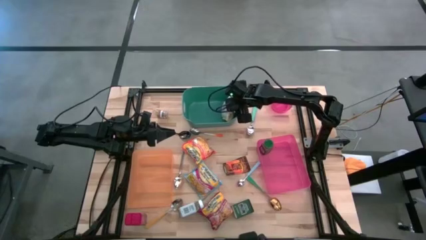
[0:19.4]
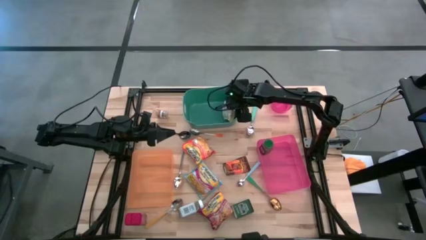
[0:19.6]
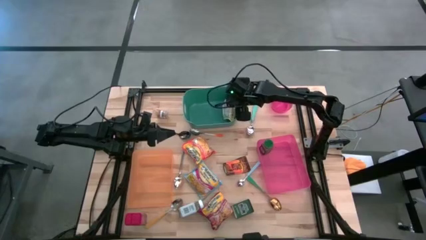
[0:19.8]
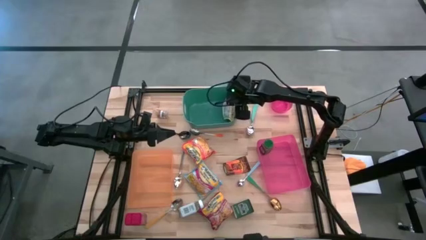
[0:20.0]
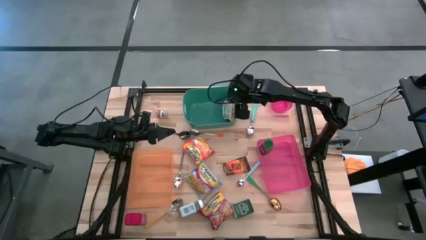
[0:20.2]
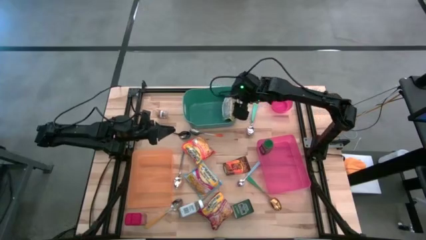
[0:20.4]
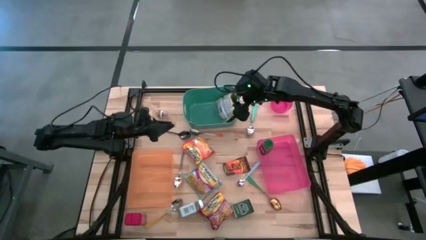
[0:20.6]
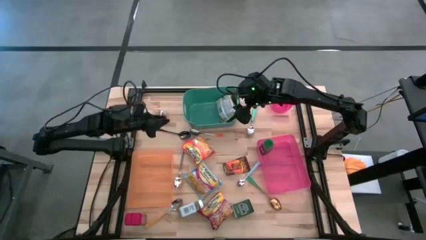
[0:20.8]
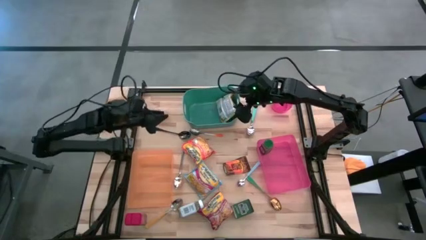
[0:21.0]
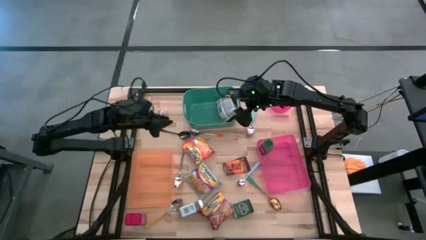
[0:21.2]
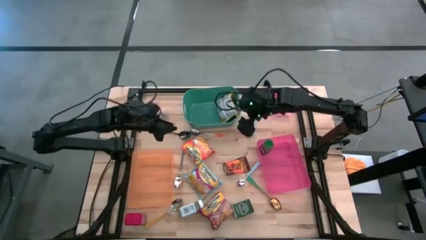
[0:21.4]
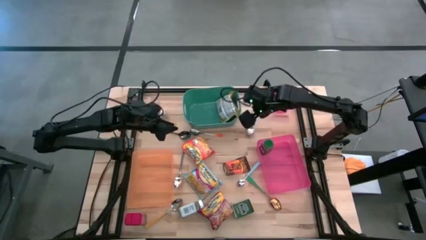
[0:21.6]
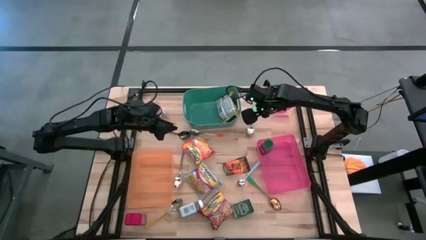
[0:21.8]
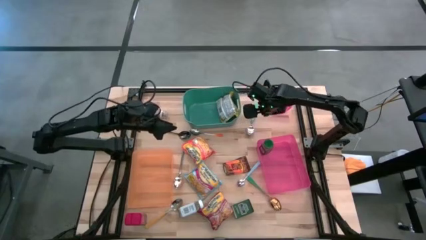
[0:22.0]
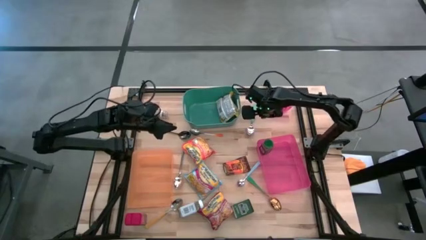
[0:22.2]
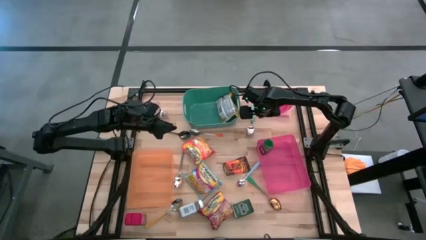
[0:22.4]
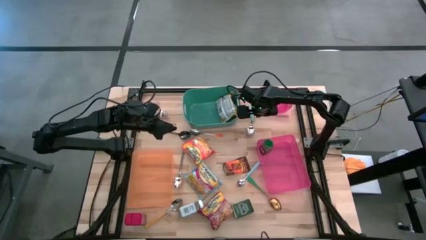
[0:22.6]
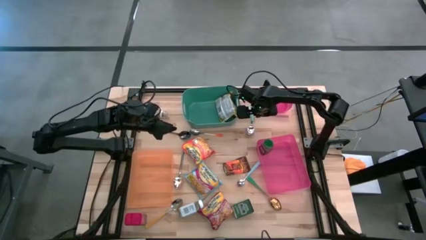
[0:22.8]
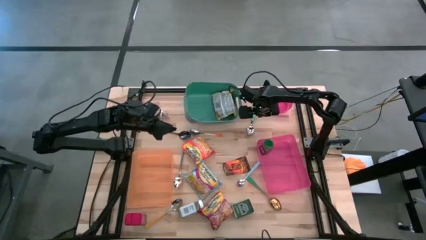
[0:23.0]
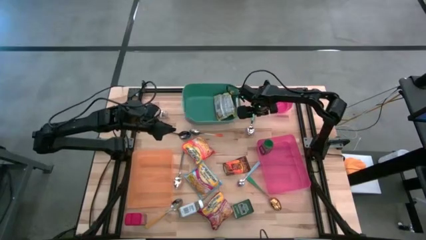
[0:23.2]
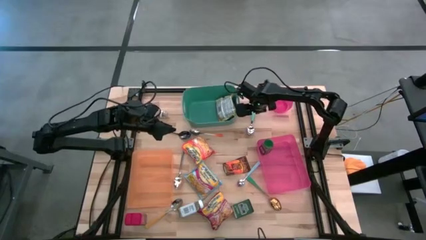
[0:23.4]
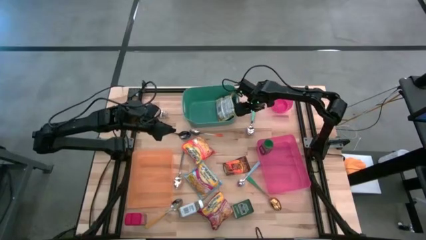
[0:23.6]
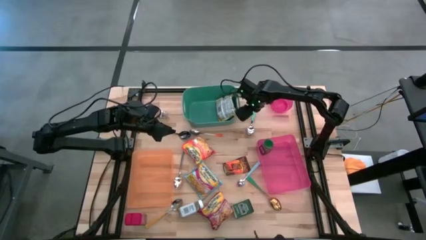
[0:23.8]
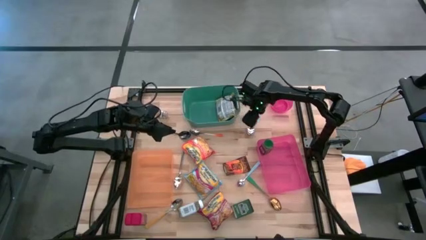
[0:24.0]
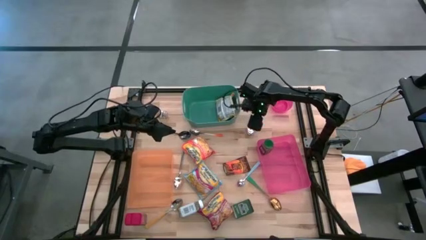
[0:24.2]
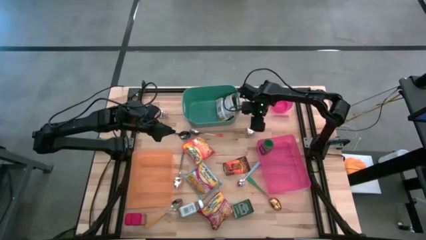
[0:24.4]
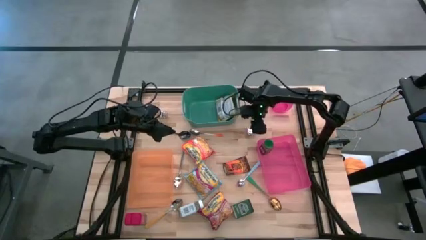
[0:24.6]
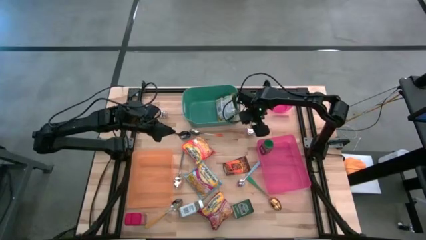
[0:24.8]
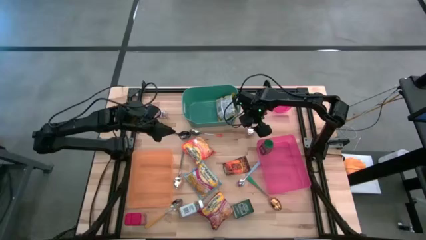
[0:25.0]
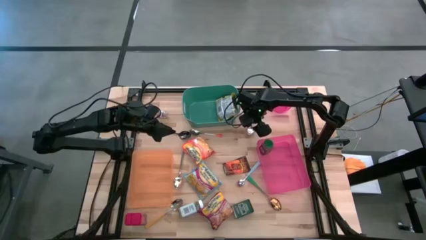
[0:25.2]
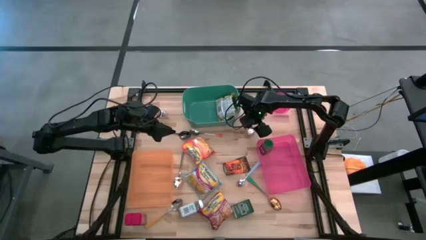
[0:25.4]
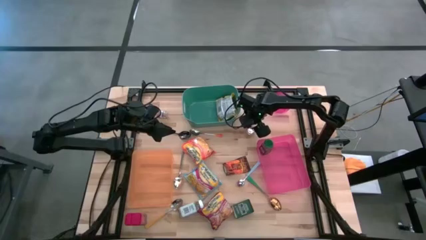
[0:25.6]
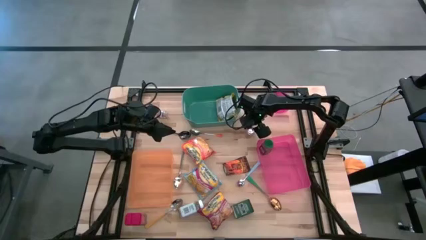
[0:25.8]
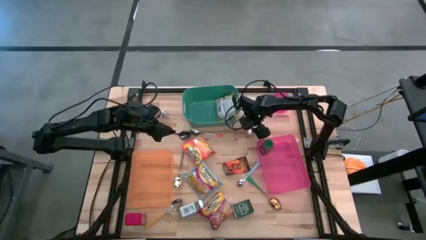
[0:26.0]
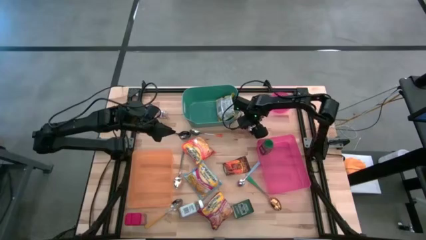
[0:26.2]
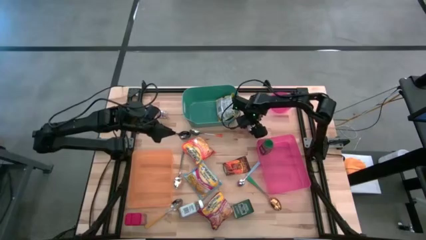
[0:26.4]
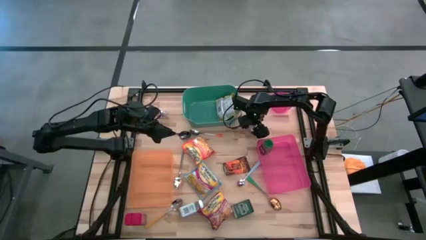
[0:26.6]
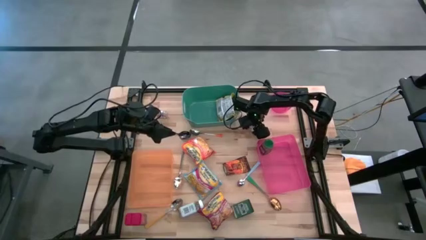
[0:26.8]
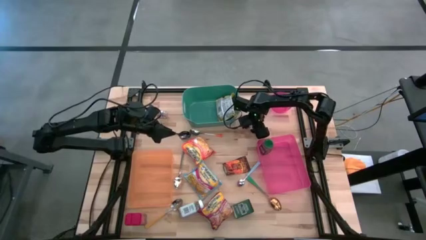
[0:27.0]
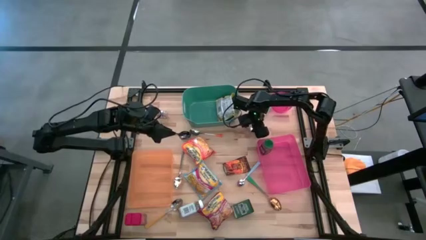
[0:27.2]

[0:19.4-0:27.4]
Put the light green spoon into the orange bin

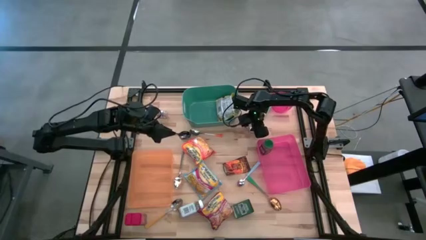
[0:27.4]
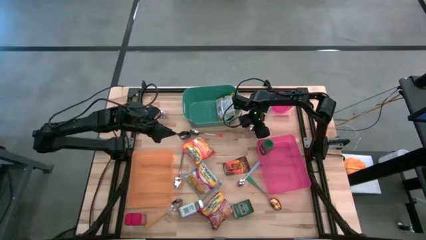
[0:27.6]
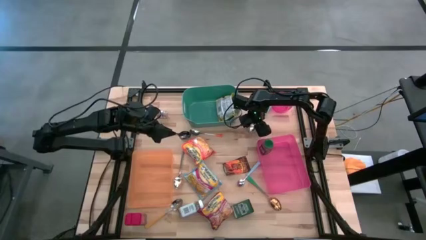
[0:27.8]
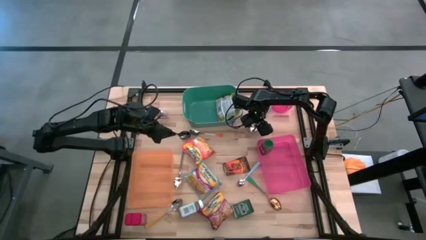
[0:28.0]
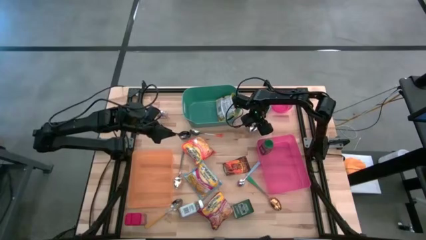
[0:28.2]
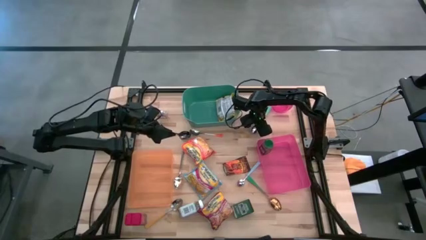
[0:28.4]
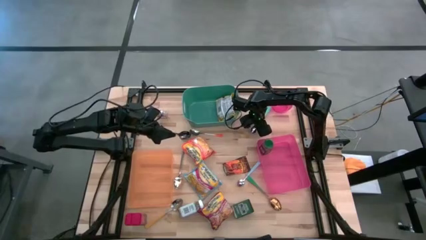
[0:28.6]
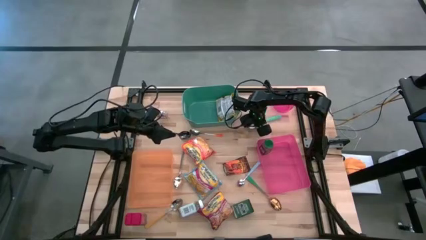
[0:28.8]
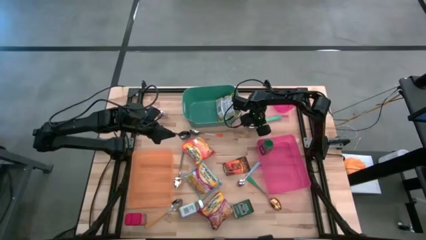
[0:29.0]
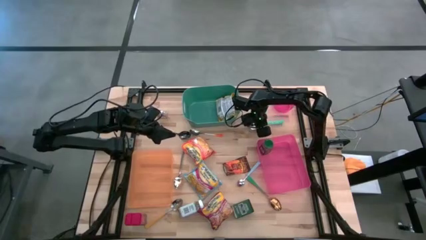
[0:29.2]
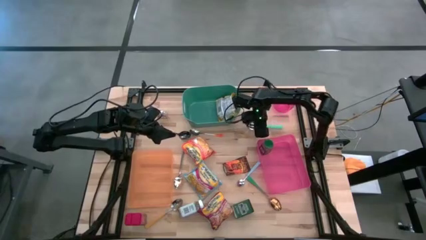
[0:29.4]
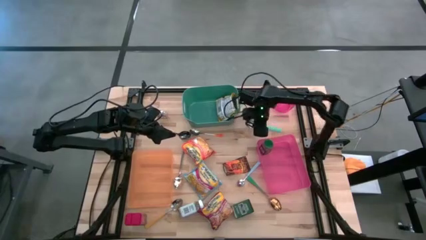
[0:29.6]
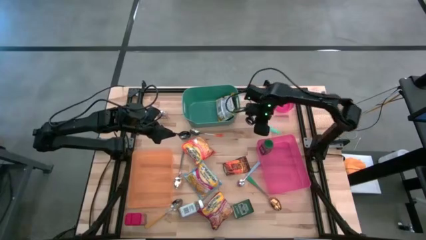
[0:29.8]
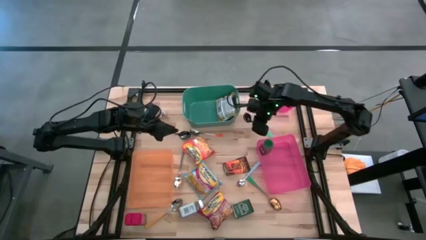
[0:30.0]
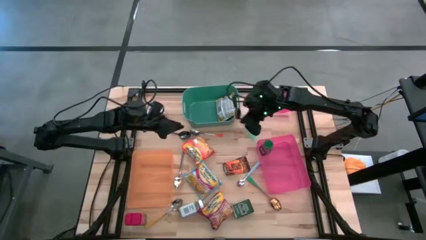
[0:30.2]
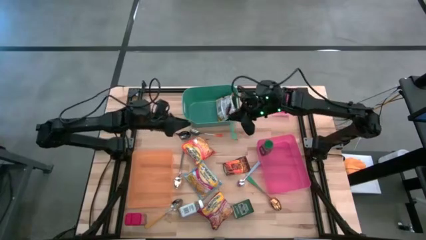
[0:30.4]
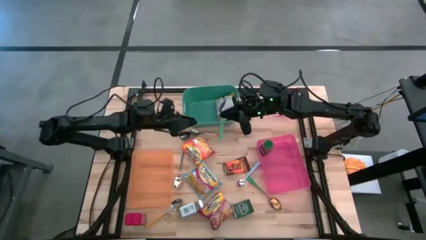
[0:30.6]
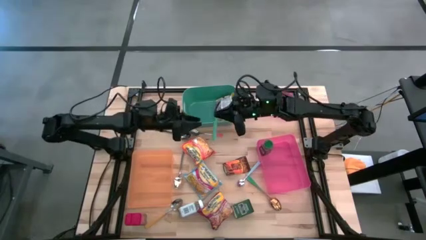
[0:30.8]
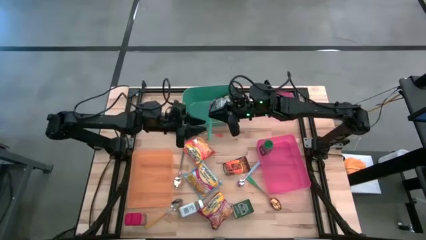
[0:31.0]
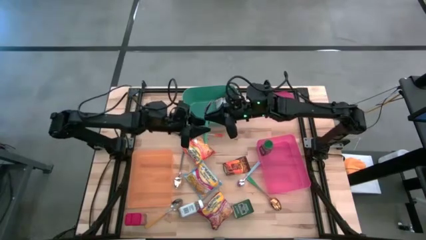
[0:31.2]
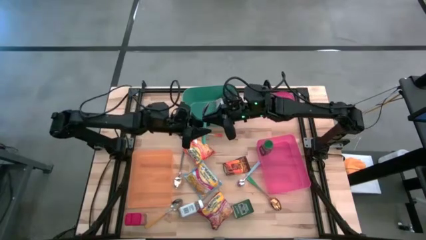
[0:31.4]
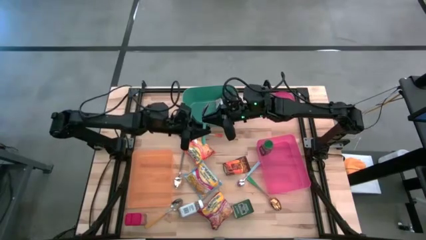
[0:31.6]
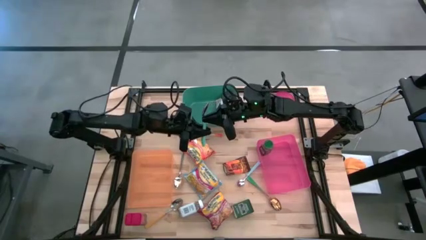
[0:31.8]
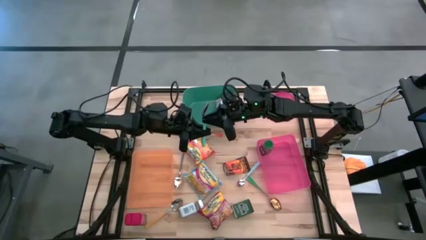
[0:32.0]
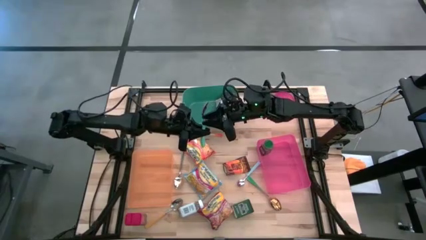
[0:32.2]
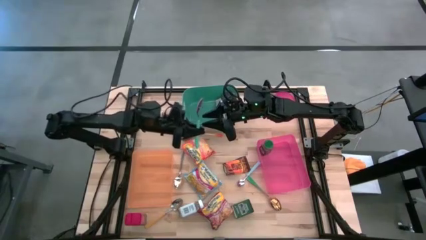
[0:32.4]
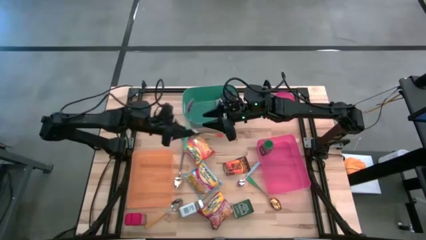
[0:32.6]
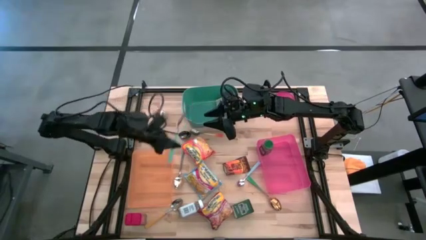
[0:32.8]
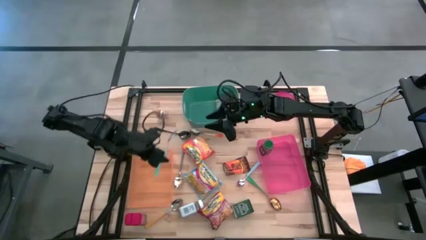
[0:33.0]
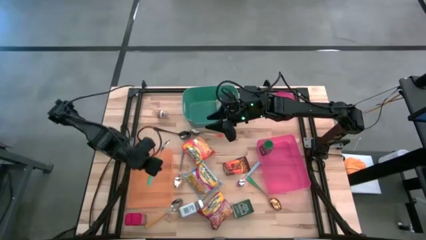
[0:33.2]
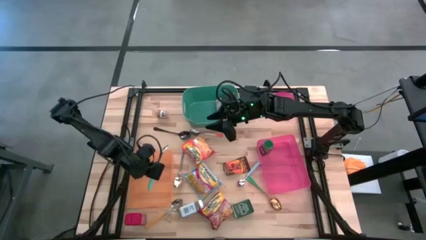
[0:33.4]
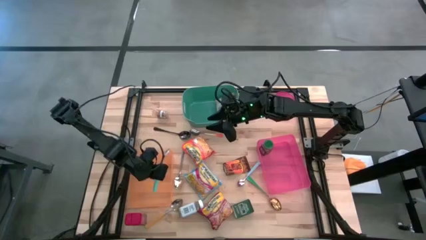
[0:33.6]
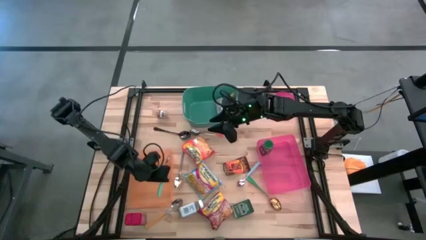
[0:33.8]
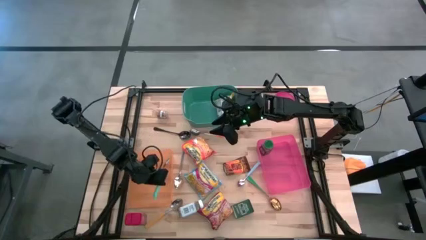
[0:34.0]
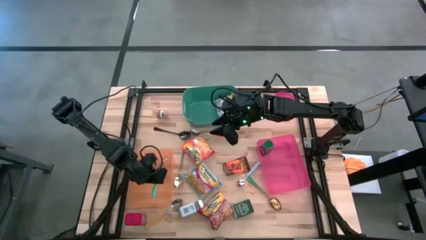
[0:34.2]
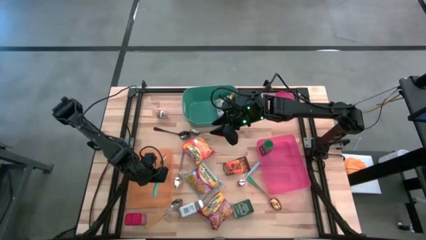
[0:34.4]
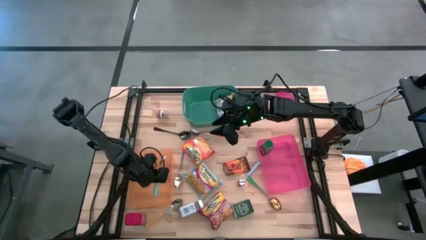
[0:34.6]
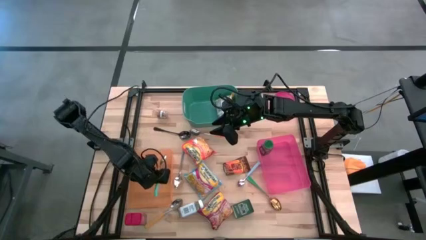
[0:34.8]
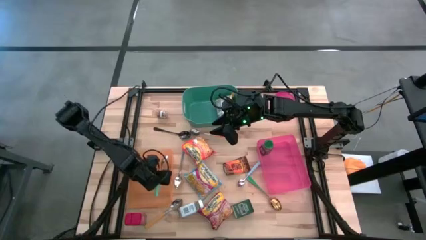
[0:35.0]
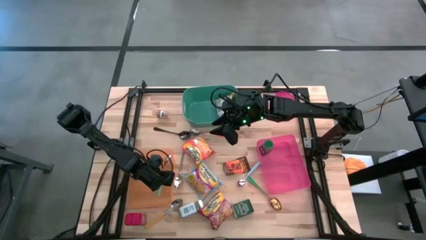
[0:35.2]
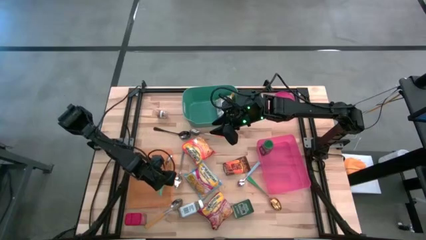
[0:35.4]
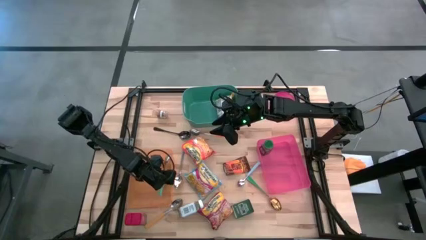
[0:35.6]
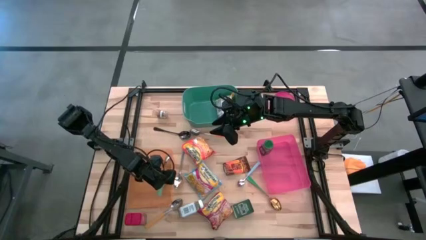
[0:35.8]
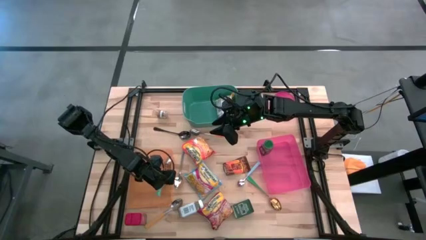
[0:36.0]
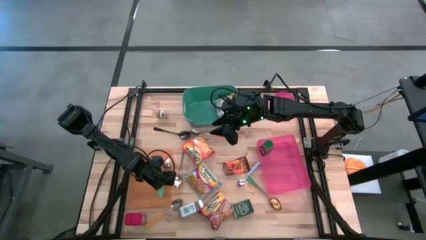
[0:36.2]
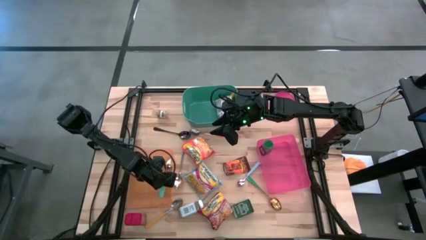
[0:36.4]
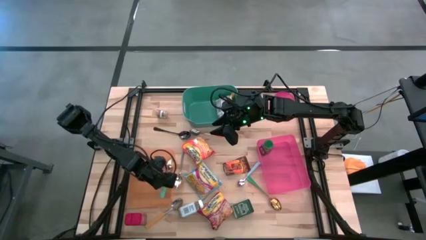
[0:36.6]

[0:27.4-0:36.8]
Put the light green spoon into the orange bin
